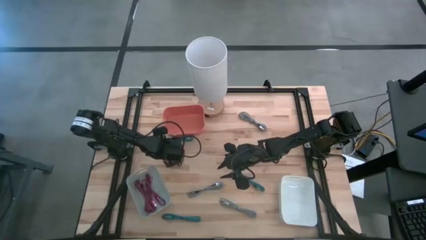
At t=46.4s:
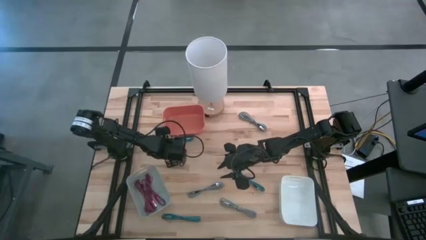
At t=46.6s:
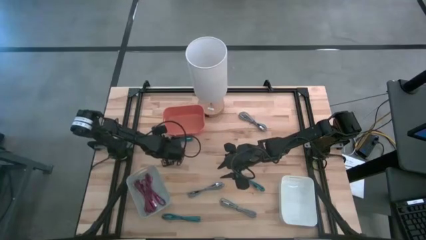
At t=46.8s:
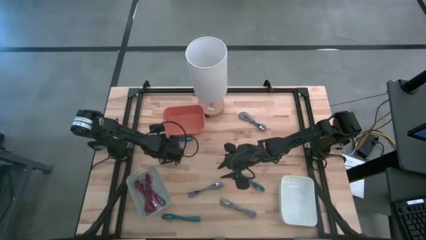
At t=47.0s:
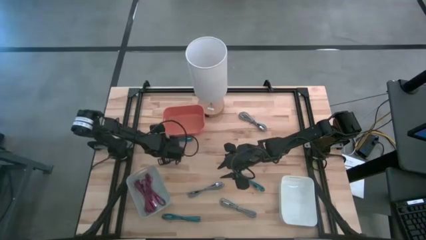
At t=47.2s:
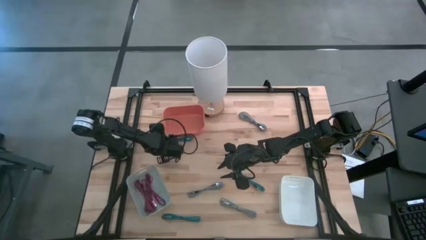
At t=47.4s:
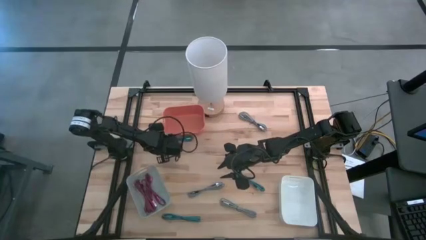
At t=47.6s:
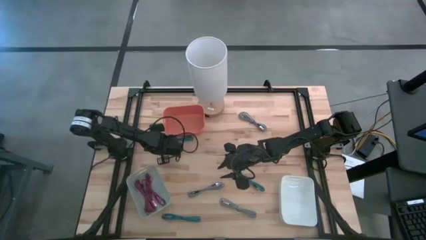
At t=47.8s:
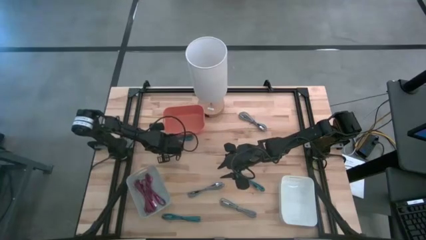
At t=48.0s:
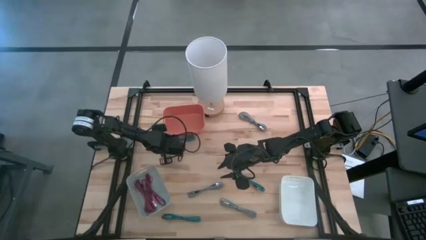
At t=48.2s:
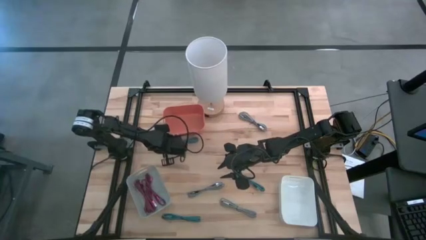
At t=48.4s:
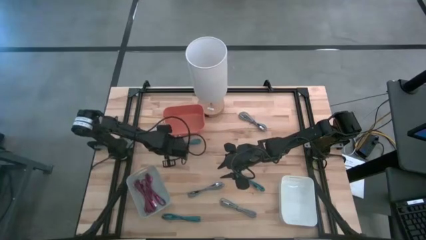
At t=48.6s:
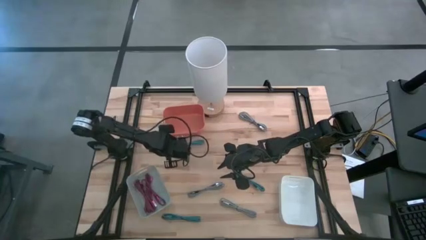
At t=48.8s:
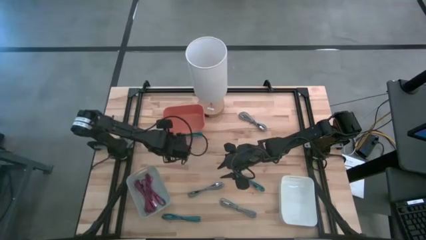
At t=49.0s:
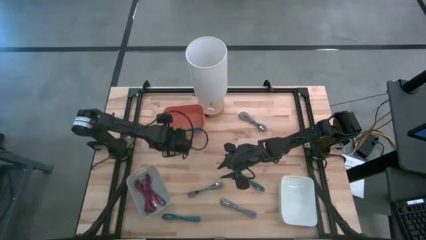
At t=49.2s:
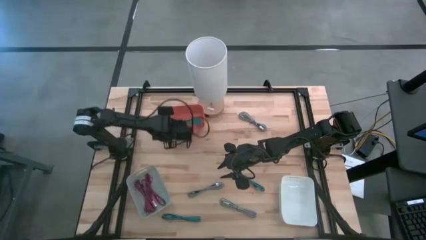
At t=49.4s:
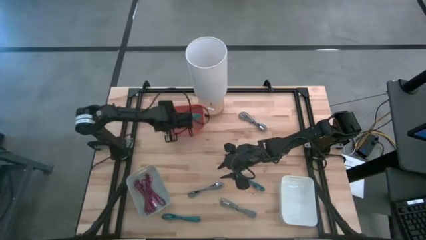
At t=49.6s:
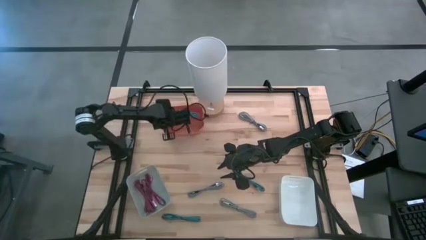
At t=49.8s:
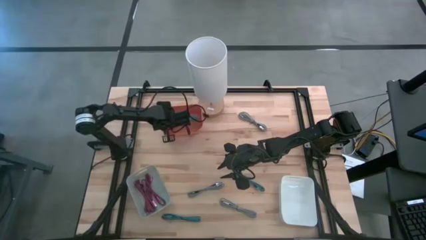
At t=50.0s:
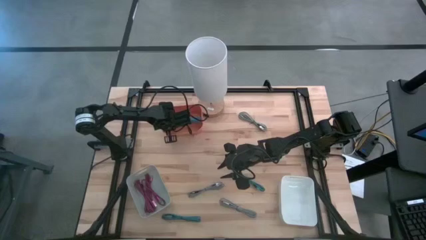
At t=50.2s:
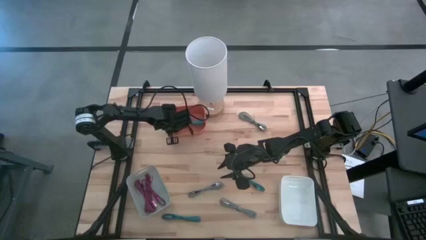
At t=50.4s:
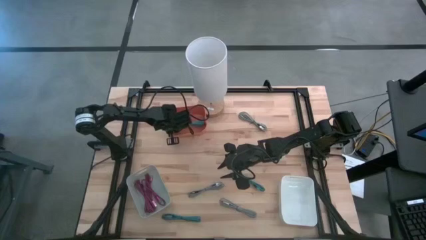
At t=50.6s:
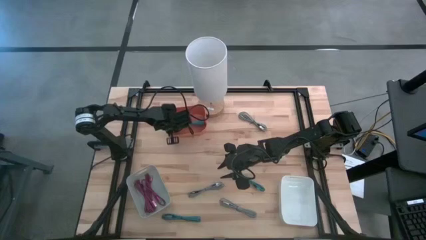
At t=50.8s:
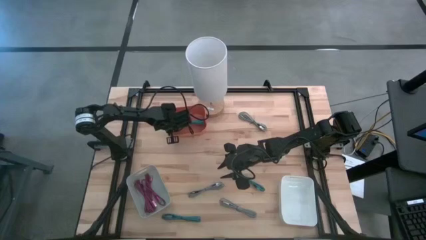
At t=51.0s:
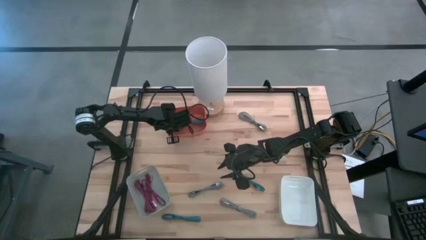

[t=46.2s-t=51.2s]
Task: Pick & Place USB Port
Put the top left blue charger cable into the orange bin

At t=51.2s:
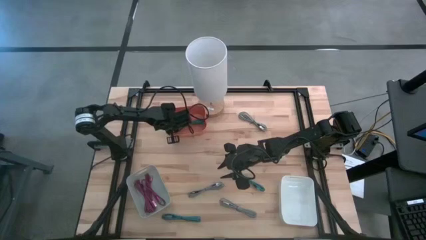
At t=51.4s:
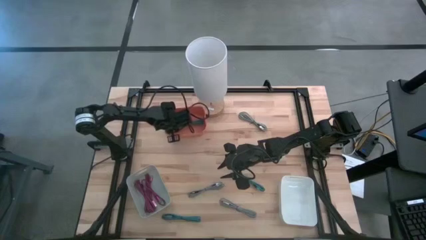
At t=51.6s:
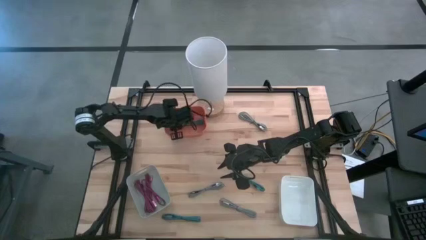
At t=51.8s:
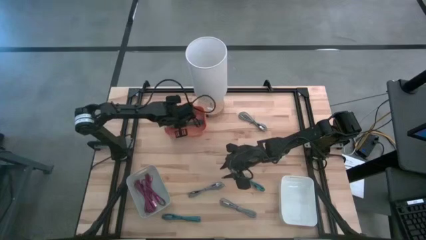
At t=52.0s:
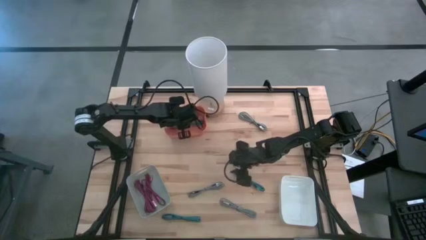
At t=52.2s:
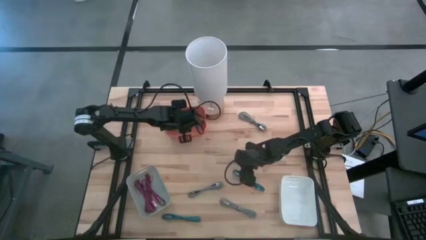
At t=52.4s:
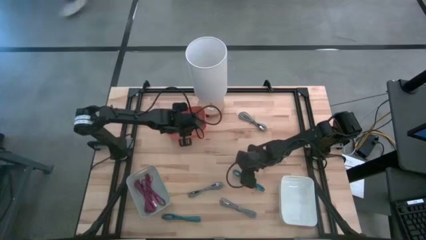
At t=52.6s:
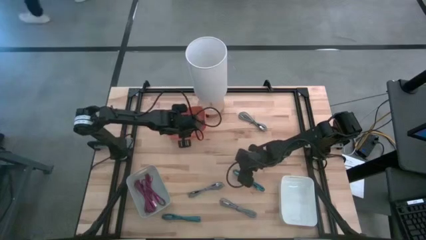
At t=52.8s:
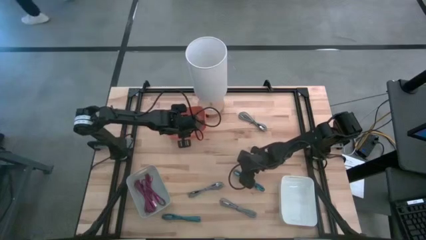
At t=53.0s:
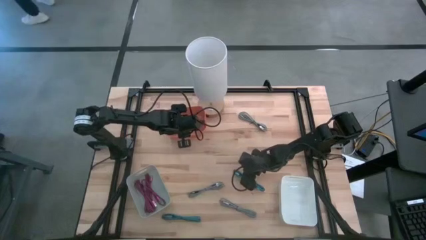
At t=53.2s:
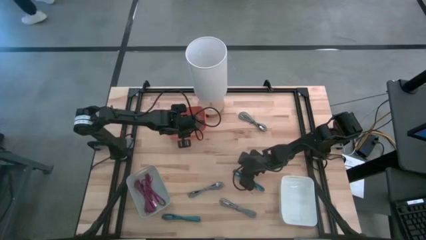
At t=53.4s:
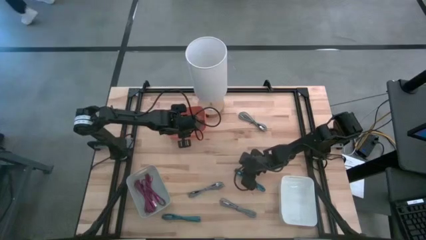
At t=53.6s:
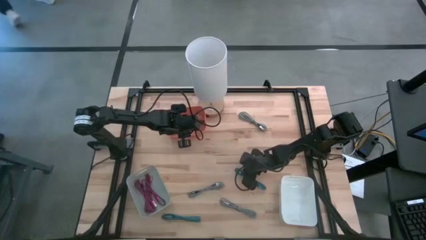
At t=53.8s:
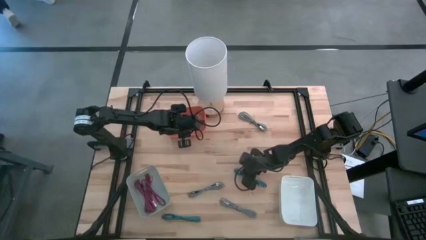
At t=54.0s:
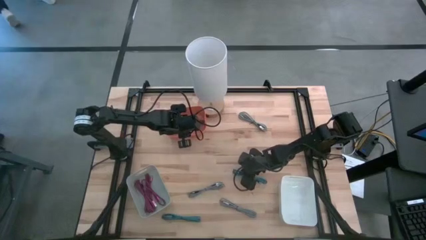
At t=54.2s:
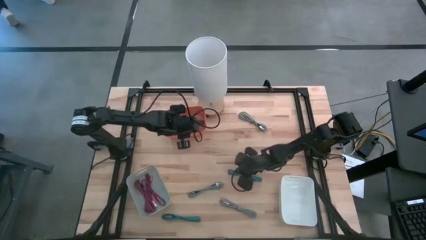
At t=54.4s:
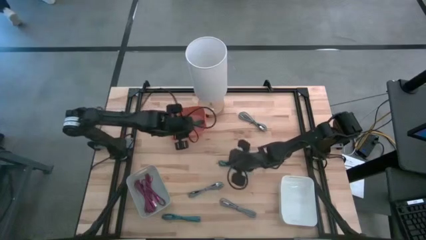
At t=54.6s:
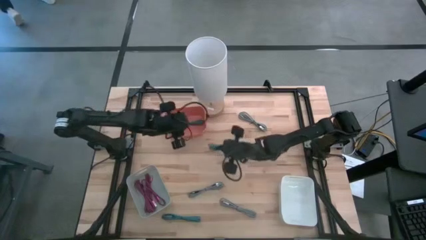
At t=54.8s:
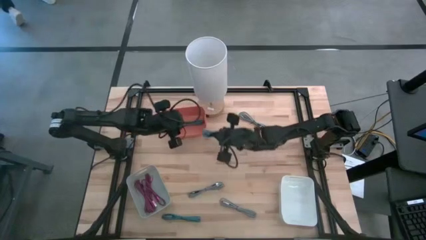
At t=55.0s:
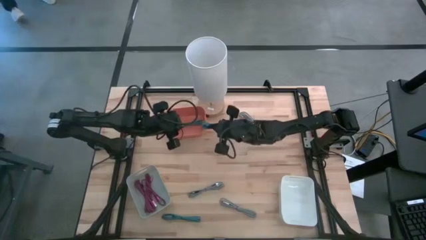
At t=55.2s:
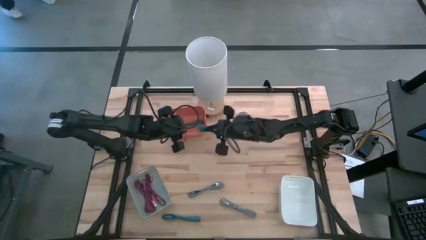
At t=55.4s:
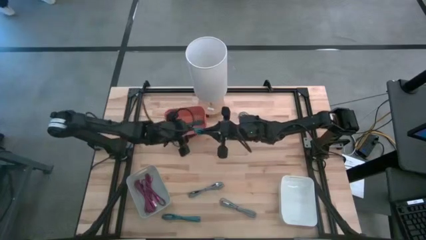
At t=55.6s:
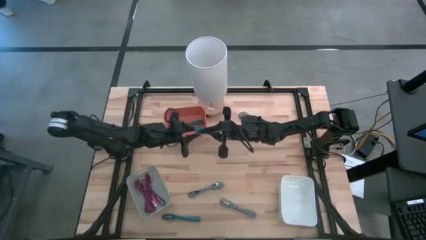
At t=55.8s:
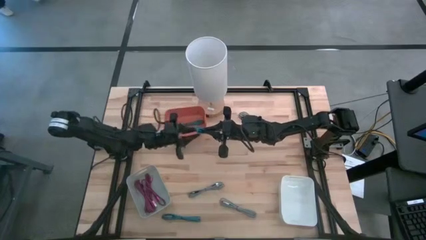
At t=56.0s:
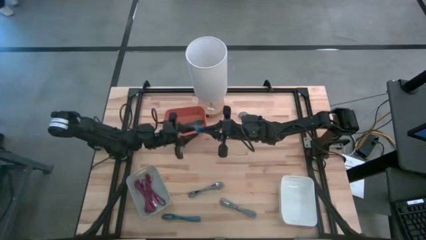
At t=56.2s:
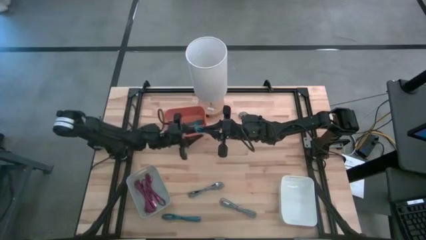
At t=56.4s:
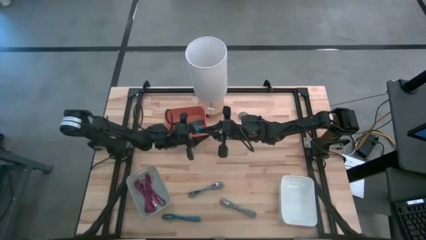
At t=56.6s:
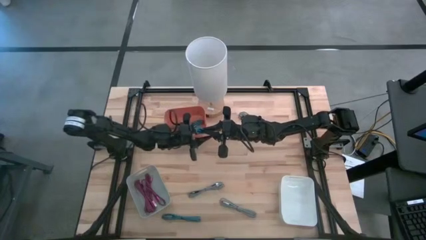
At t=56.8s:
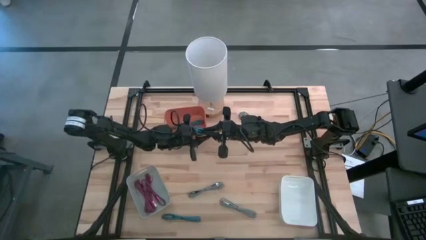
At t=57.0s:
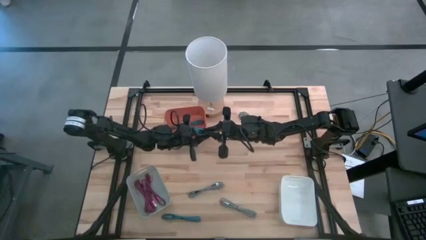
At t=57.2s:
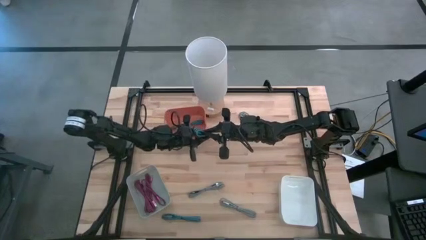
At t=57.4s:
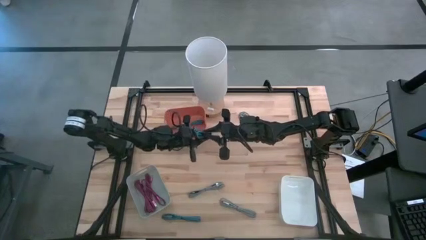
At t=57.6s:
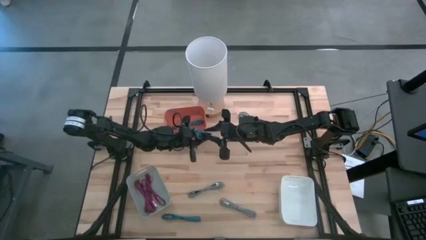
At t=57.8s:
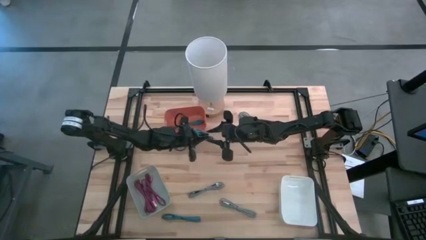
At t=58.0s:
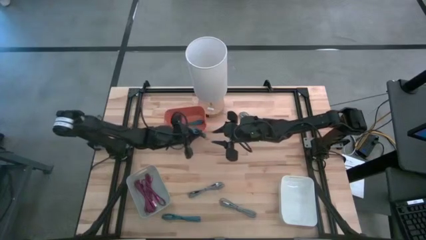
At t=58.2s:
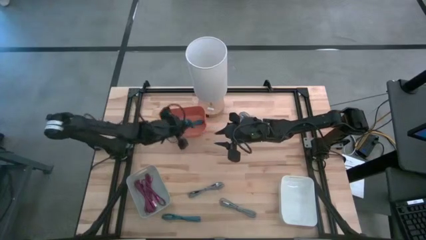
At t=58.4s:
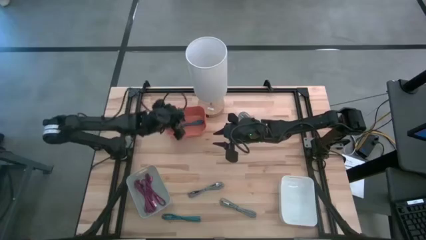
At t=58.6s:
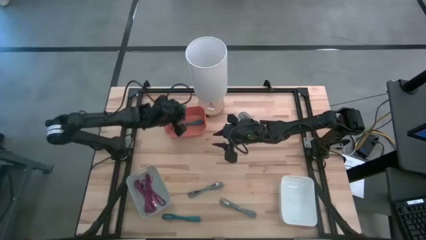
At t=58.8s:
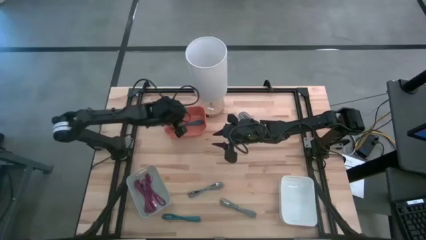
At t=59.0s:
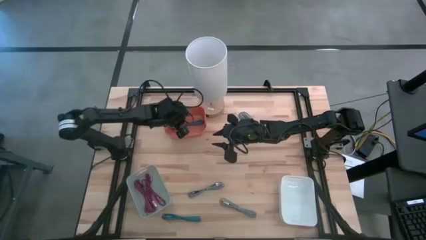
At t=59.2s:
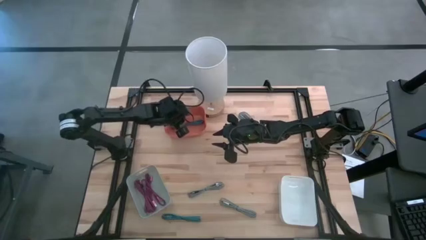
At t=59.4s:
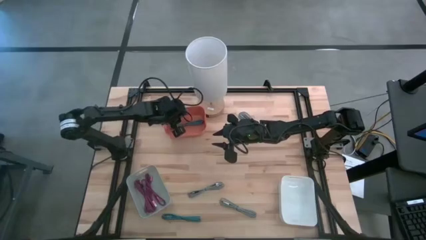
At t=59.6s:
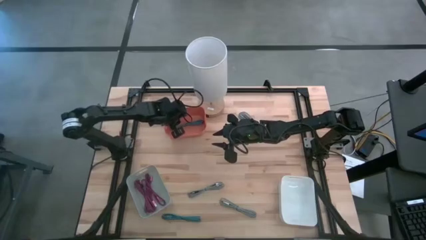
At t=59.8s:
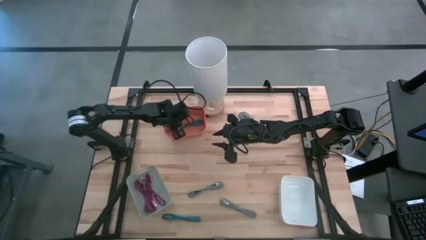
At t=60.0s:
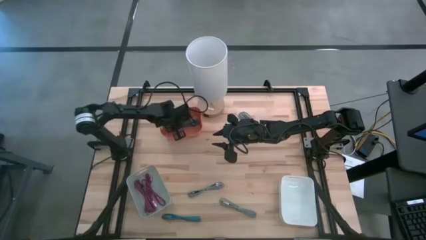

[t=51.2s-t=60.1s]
Put the right blue charger cable into the orange bin

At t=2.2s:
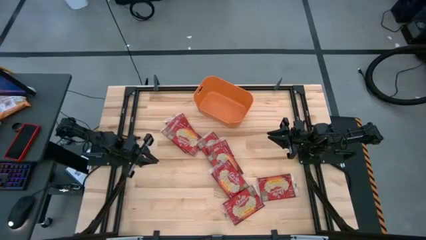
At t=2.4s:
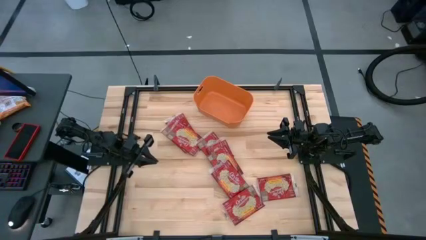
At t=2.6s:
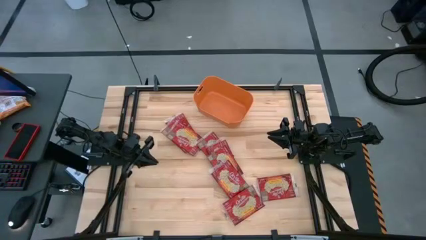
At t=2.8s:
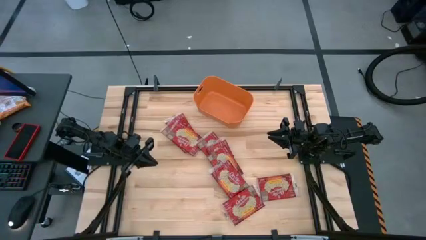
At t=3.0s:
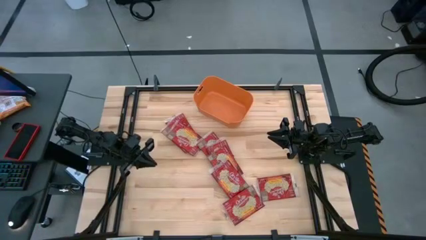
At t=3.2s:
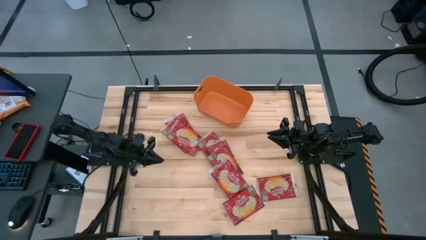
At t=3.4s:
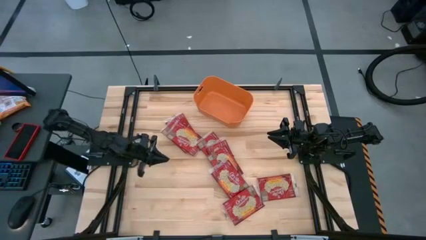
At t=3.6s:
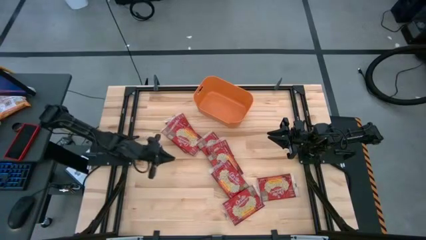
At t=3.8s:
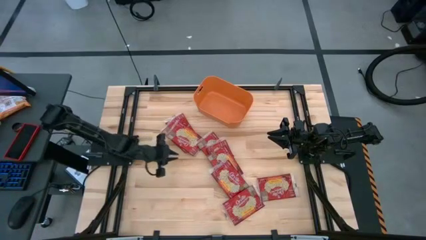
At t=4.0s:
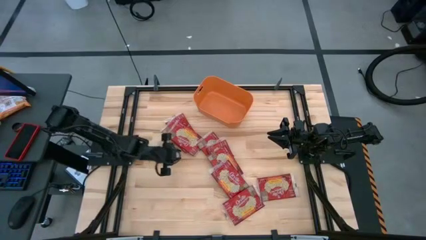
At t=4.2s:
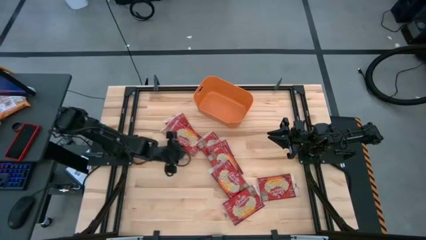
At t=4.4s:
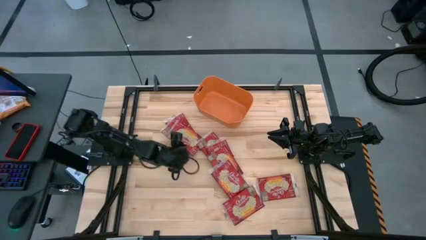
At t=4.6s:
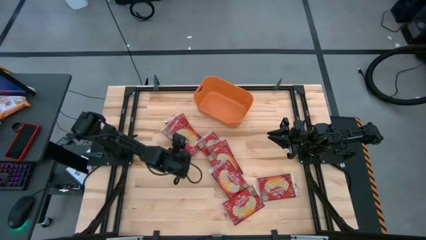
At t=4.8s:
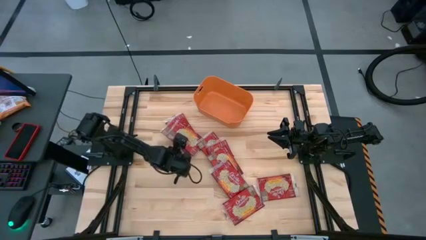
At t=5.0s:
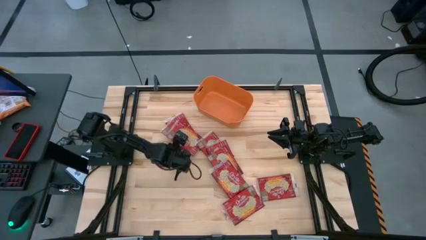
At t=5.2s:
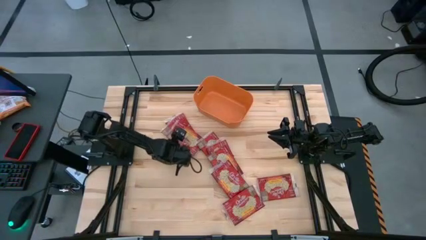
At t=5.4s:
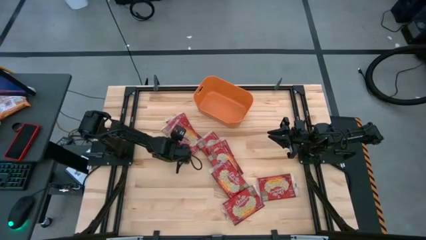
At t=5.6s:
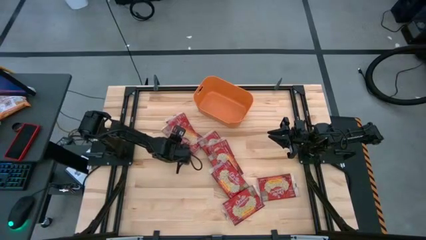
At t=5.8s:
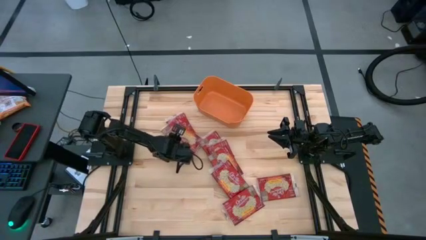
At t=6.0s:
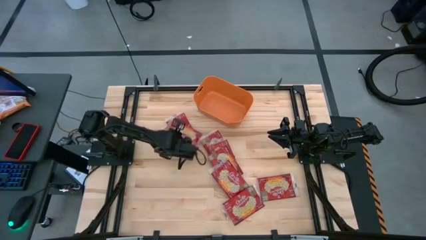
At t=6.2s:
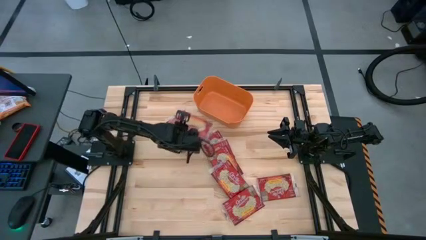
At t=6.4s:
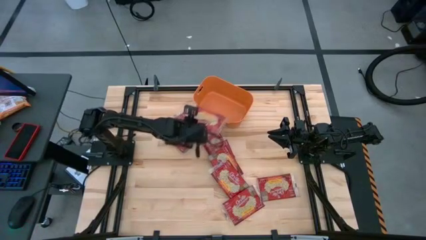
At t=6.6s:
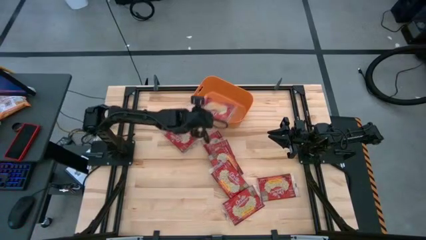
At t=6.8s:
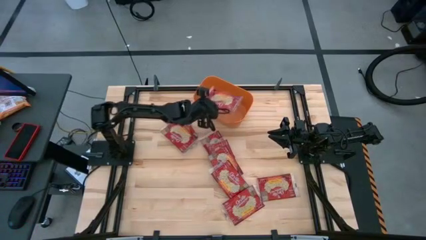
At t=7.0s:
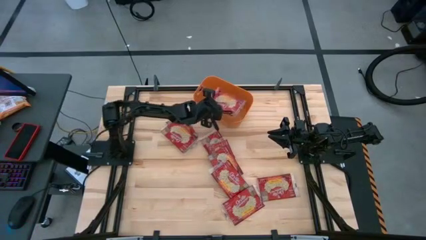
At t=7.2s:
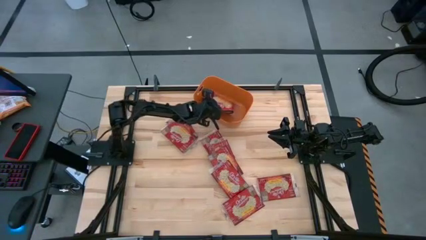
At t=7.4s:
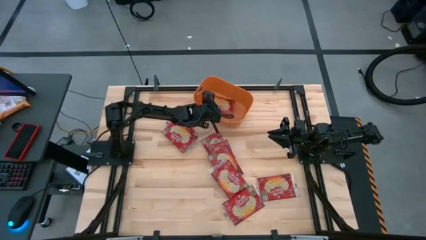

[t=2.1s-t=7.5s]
Task: Sort popcorn bags into baskets
Put the red popcorn pack into the orange bin
